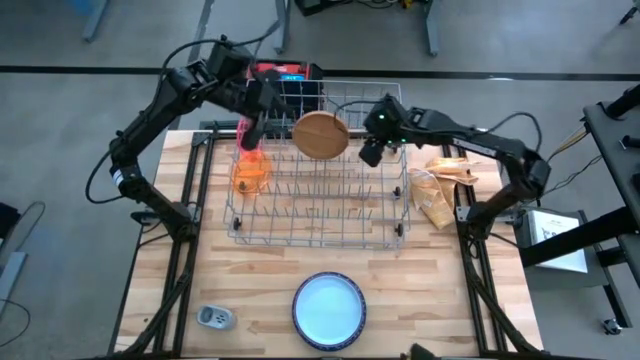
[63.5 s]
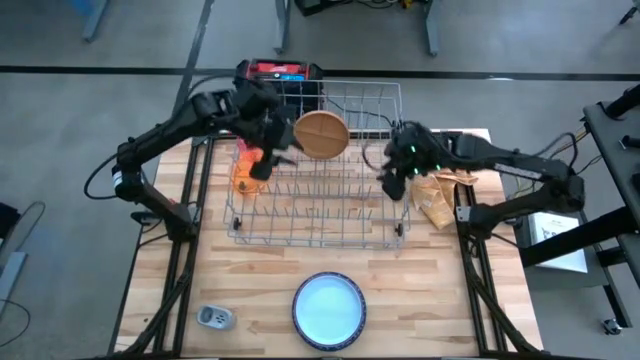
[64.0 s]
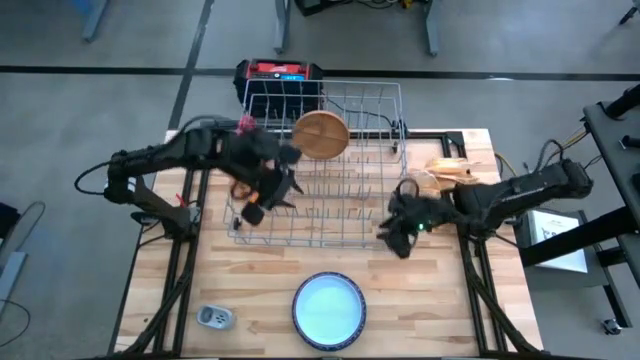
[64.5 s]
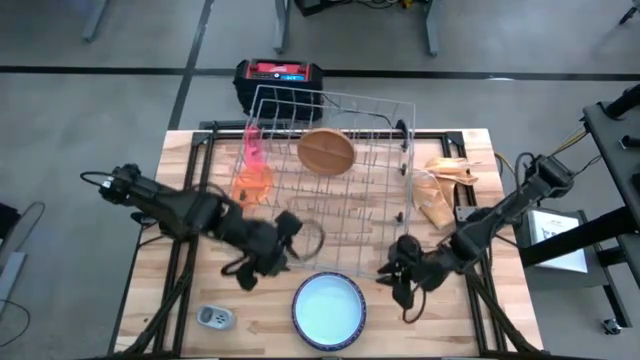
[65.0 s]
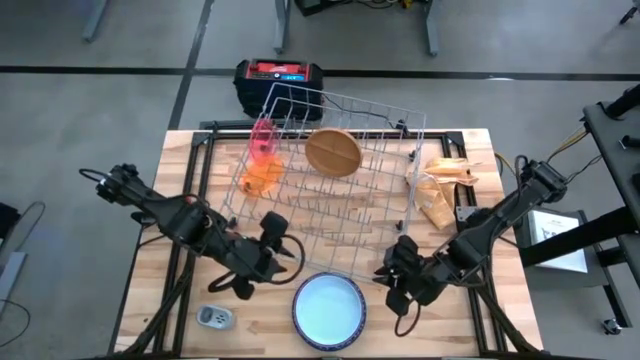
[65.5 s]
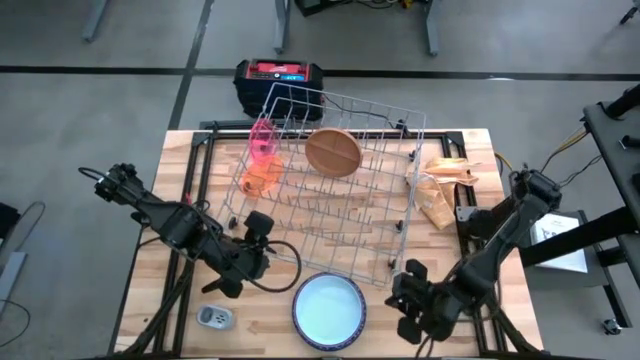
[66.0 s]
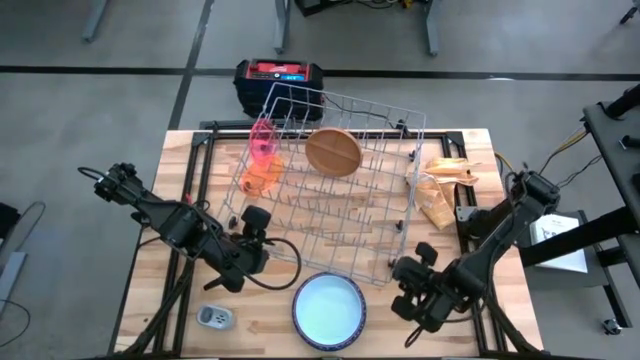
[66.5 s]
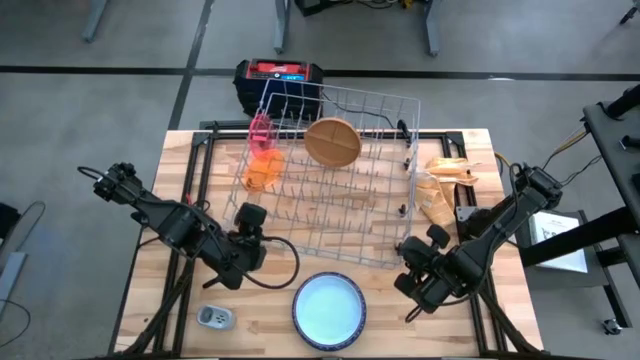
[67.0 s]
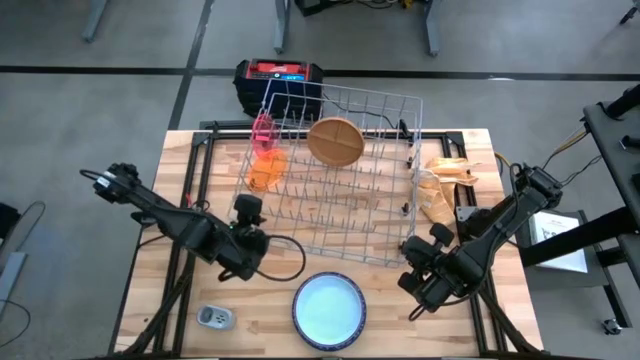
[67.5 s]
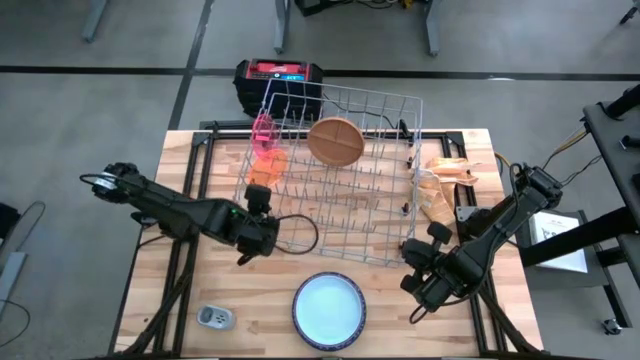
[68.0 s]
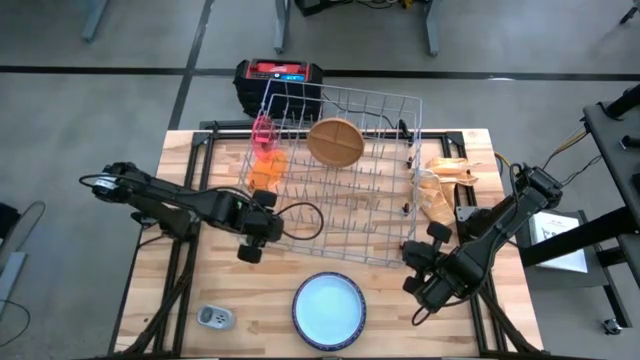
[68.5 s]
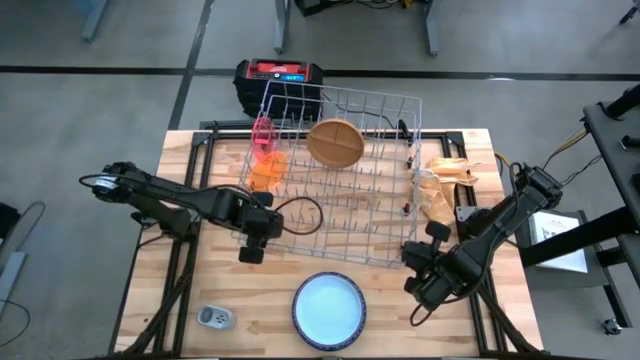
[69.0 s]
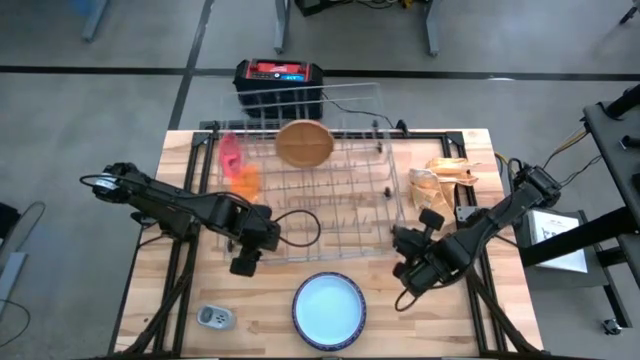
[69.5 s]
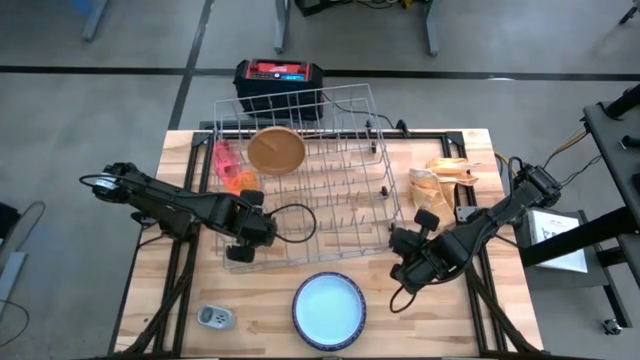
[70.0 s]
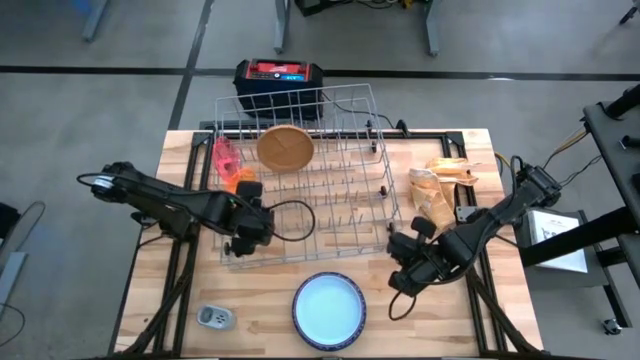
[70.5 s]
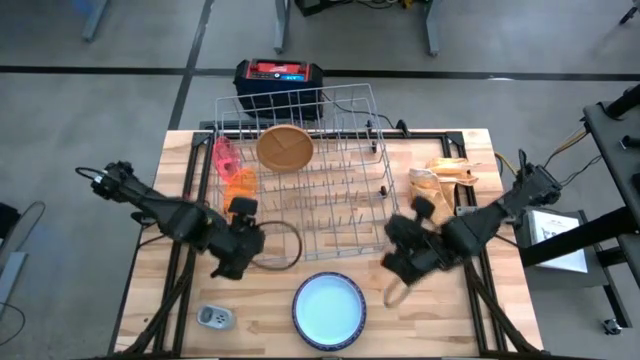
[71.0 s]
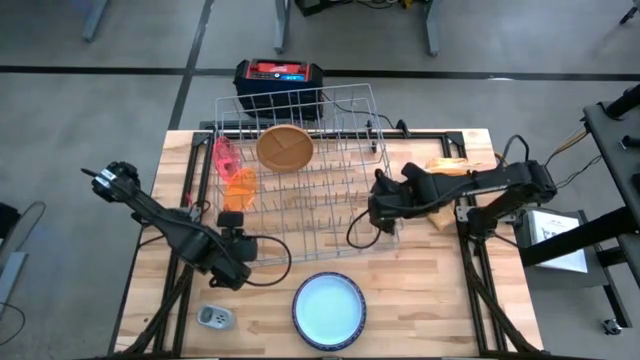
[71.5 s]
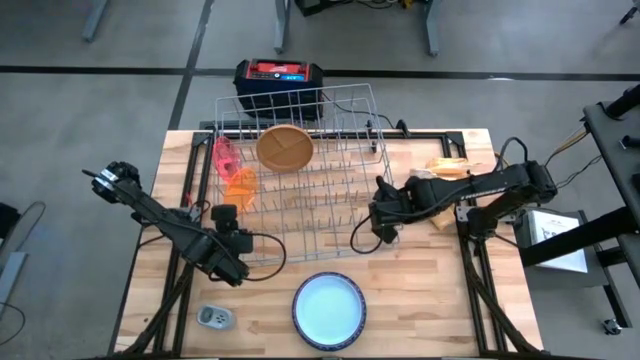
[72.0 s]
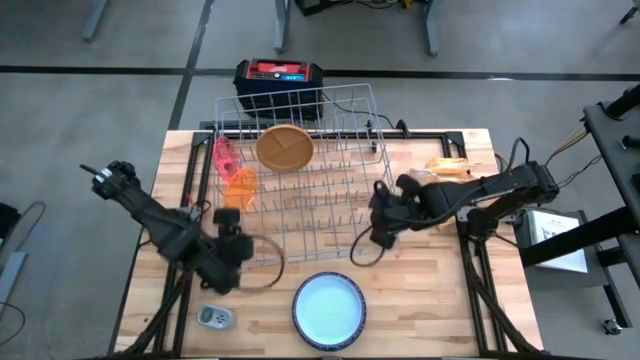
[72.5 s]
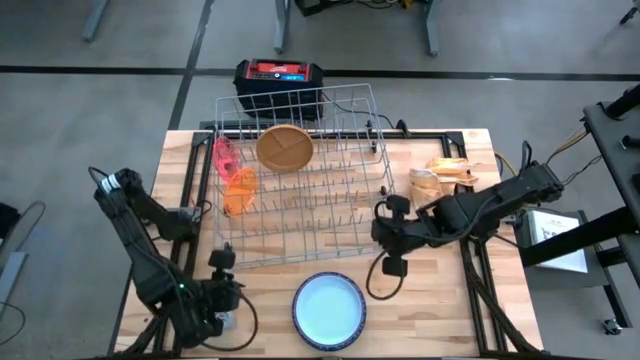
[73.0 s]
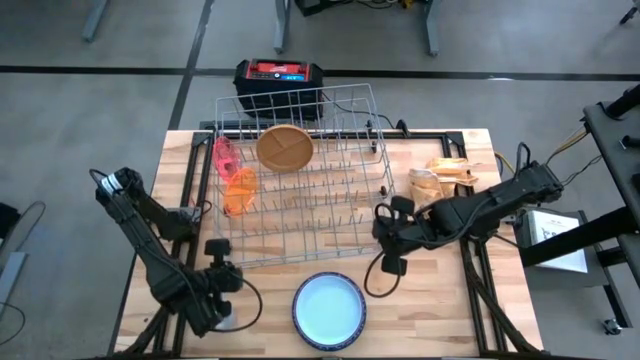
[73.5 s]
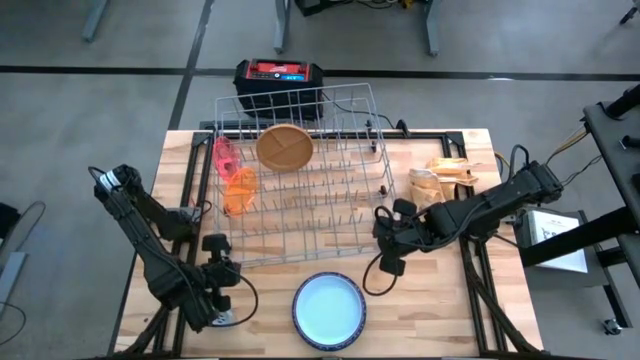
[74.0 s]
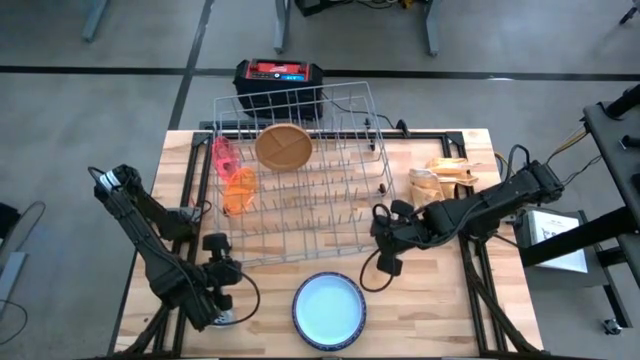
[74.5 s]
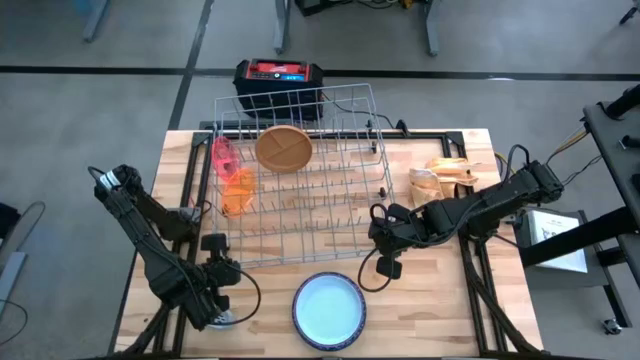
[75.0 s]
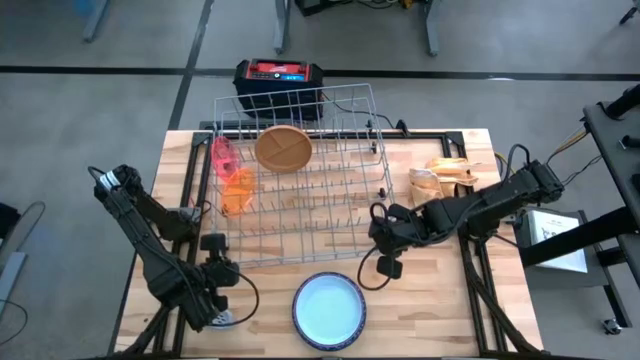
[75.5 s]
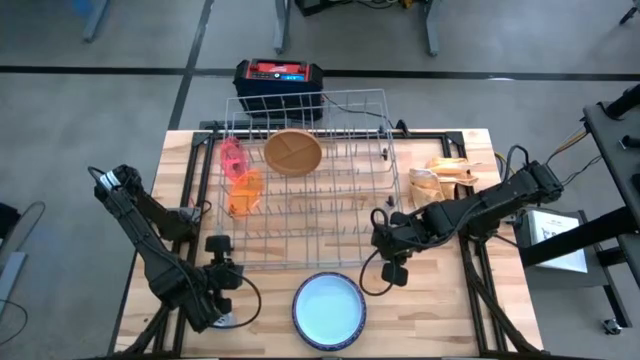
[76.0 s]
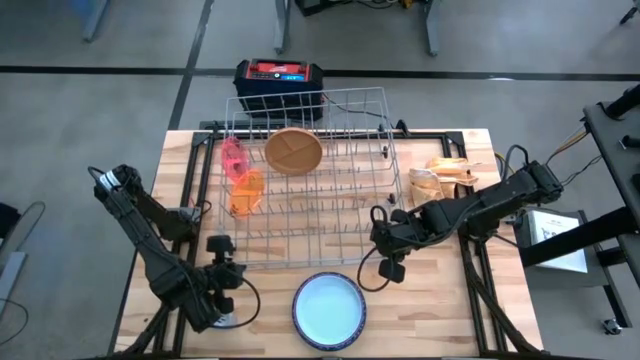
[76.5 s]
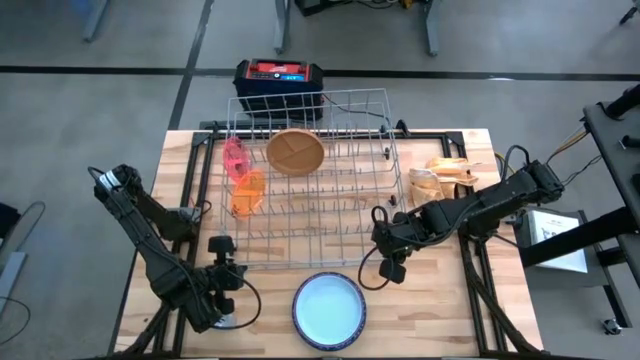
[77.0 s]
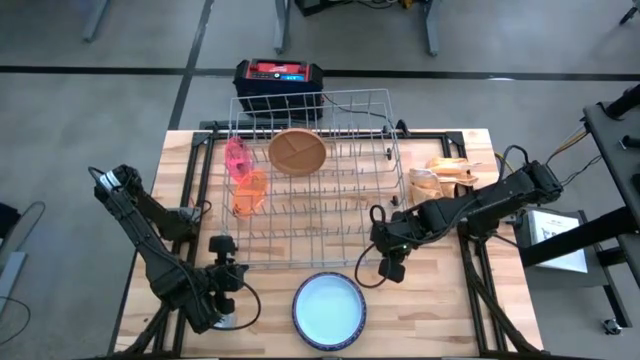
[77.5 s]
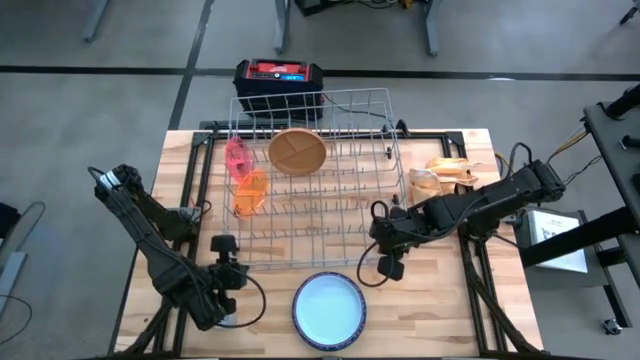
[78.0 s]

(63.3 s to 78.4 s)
Task: Sort dishes
Adjust the dish rack on the table

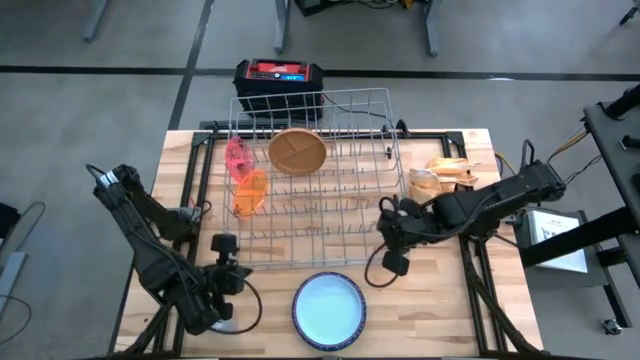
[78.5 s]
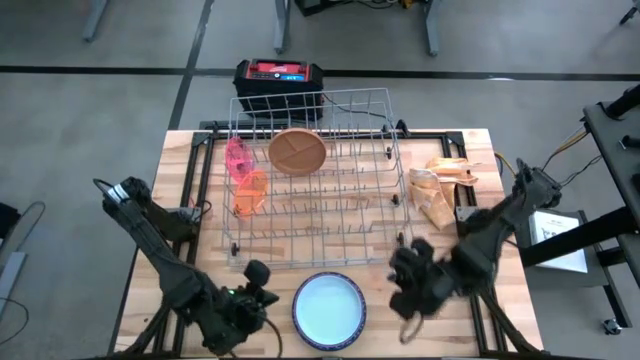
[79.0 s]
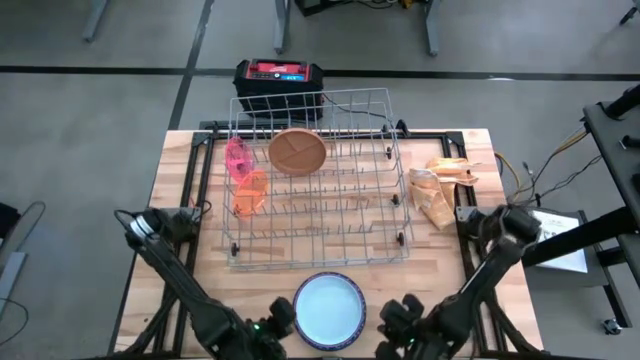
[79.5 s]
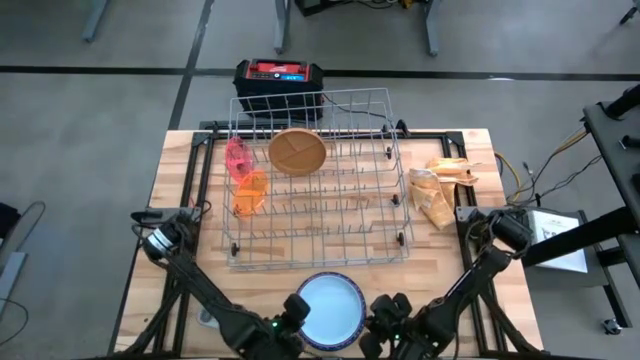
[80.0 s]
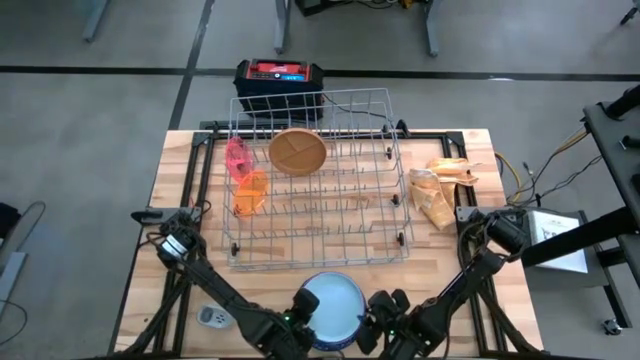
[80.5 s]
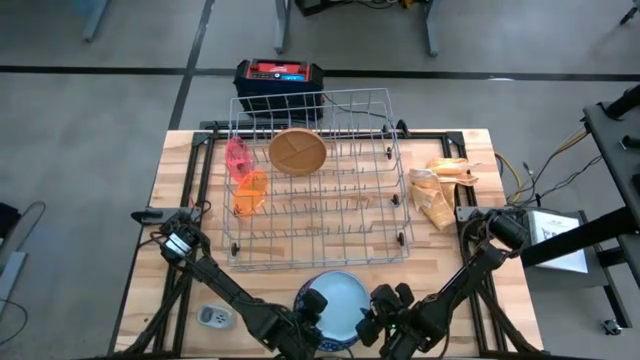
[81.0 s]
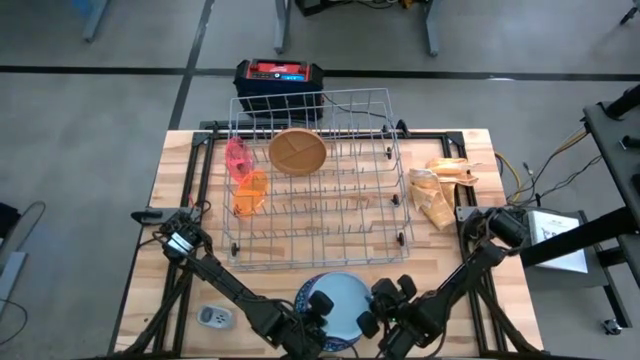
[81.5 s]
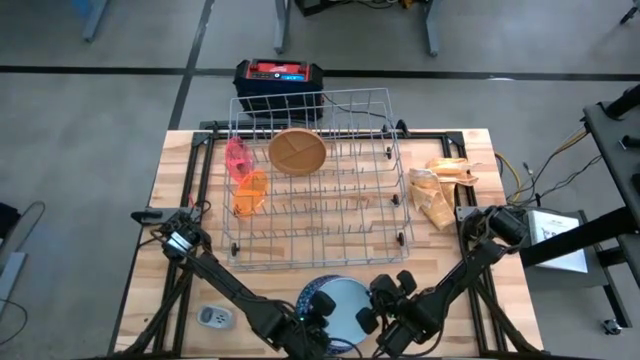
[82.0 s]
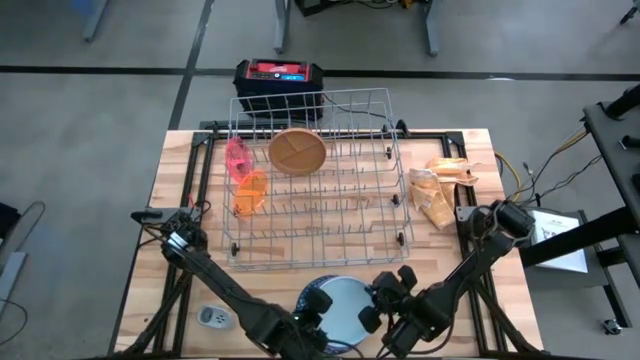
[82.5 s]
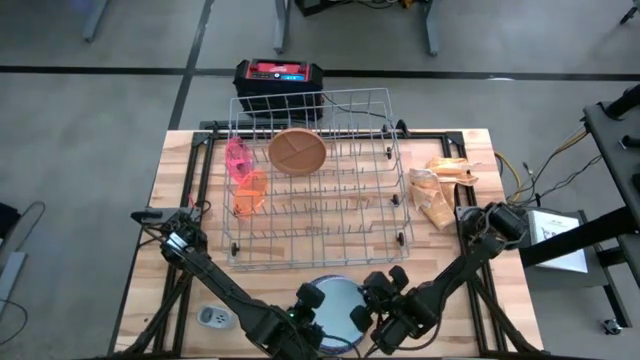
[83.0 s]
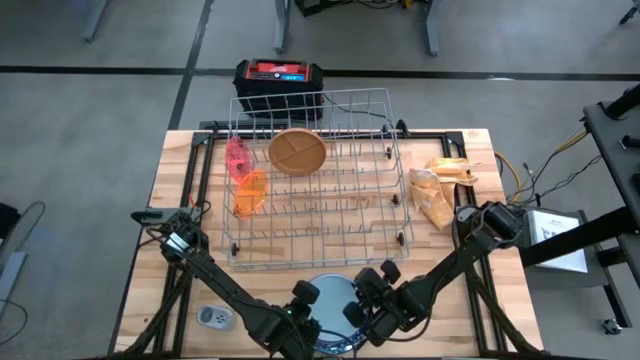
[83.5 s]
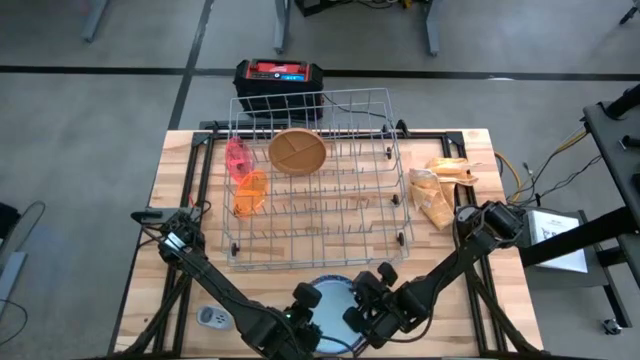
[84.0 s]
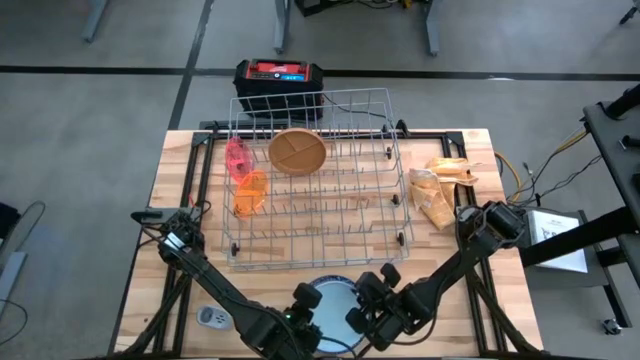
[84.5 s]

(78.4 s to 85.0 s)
Put the gray plate into the dish rack

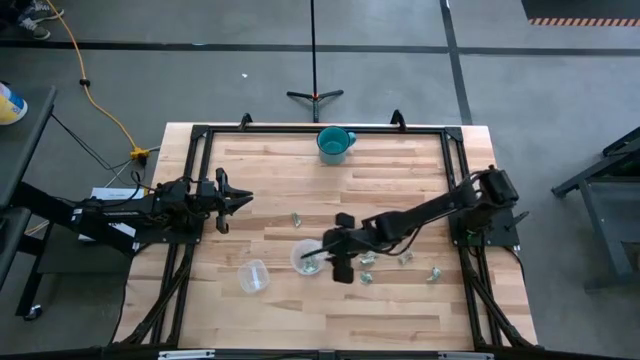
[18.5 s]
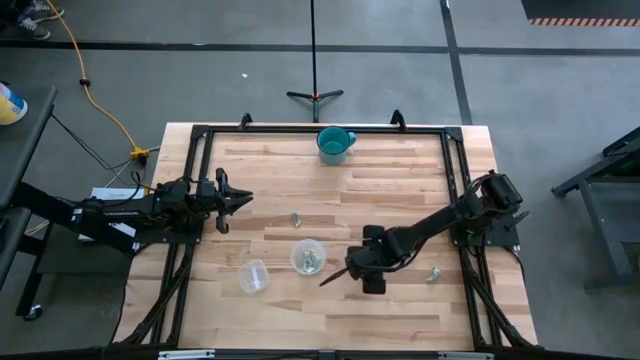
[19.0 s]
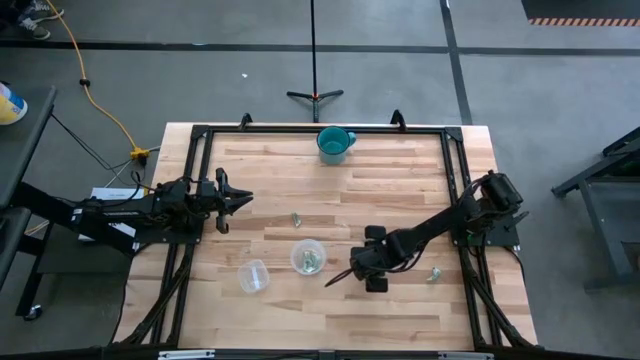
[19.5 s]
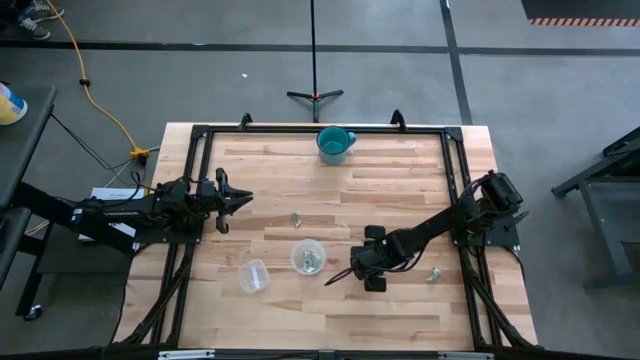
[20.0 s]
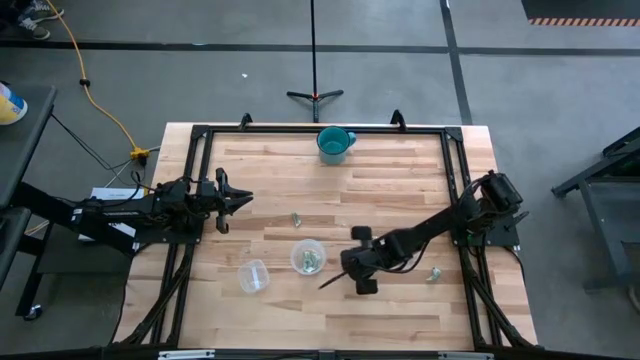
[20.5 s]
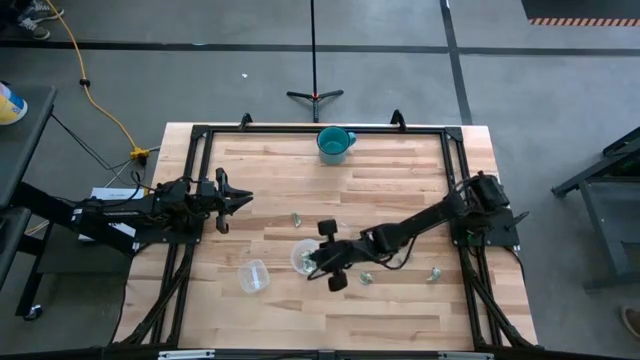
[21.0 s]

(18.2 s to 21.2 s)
Task: Pick and place items into bin
Put the stevia packet into the right transparent bin
